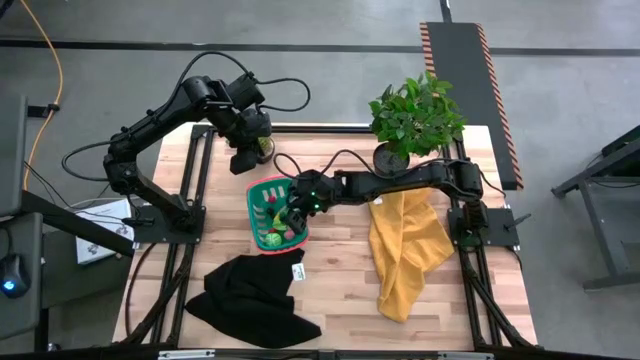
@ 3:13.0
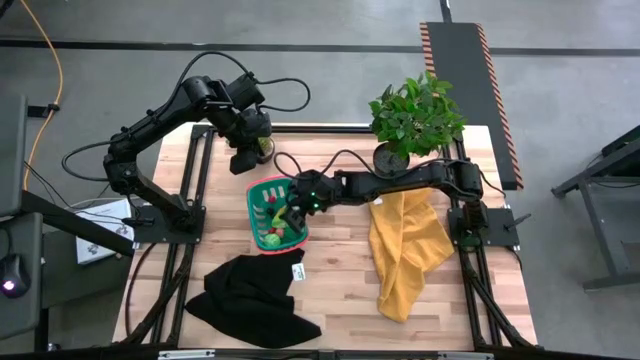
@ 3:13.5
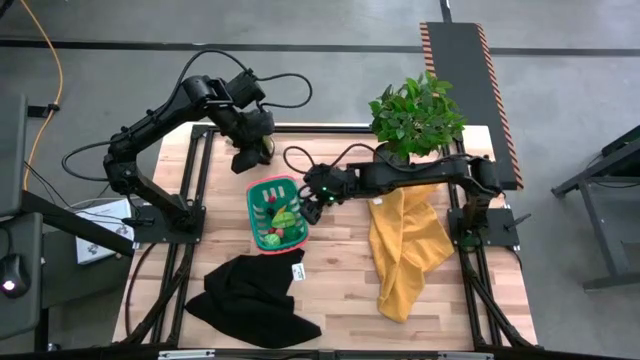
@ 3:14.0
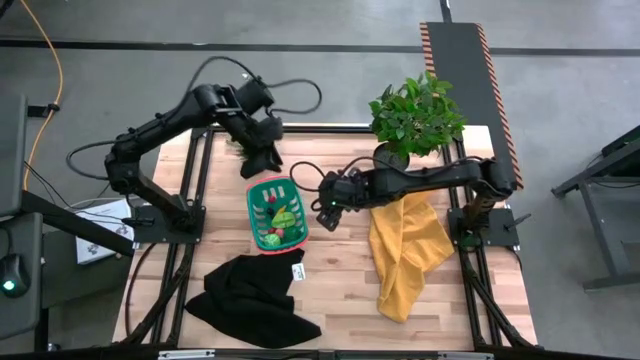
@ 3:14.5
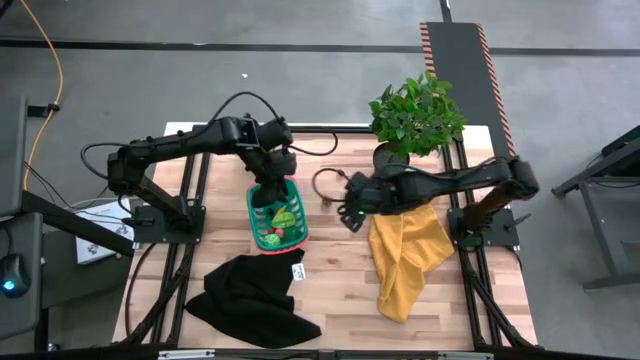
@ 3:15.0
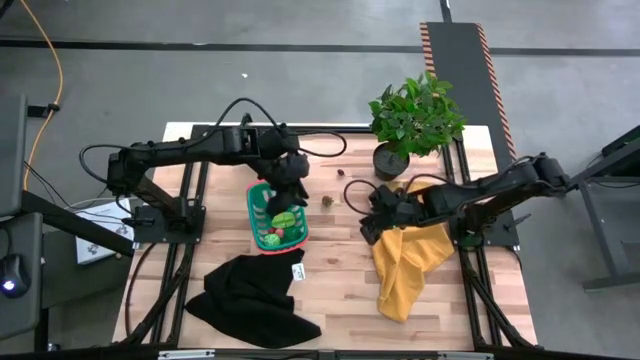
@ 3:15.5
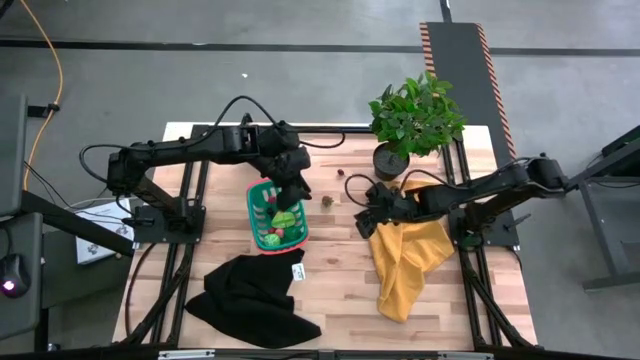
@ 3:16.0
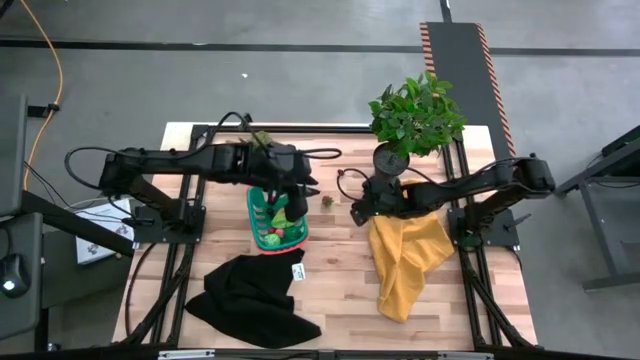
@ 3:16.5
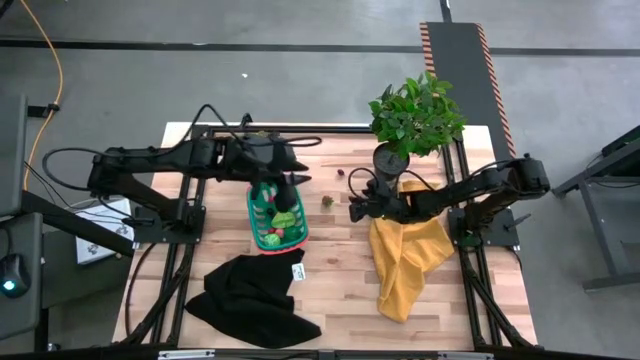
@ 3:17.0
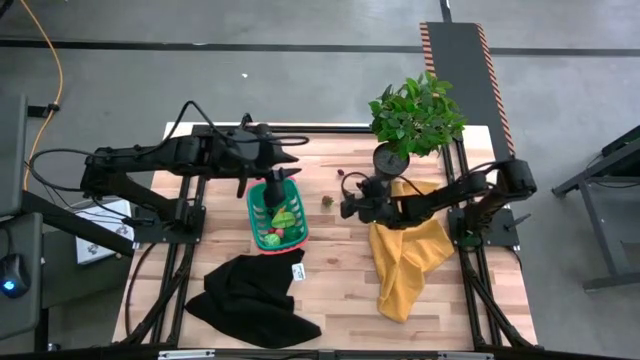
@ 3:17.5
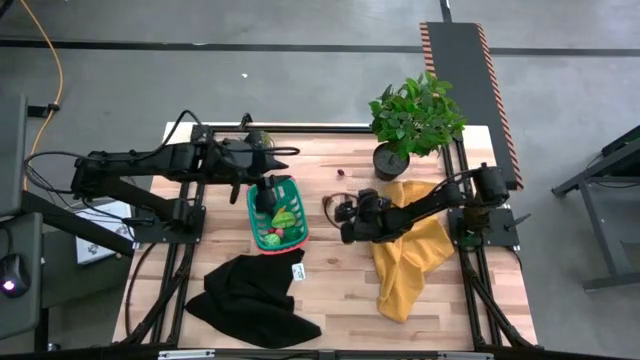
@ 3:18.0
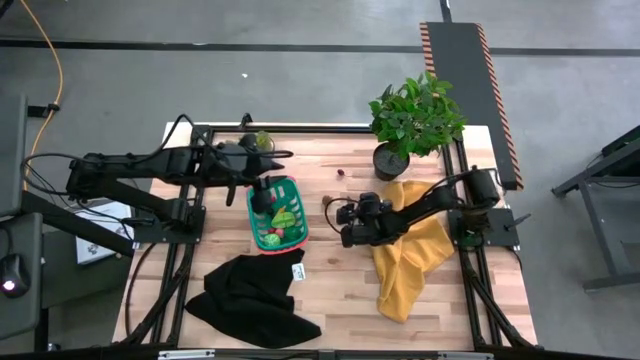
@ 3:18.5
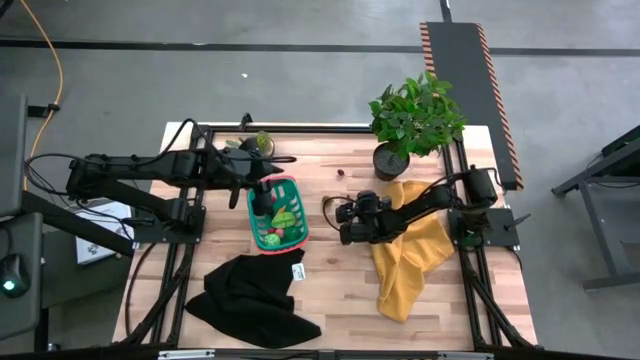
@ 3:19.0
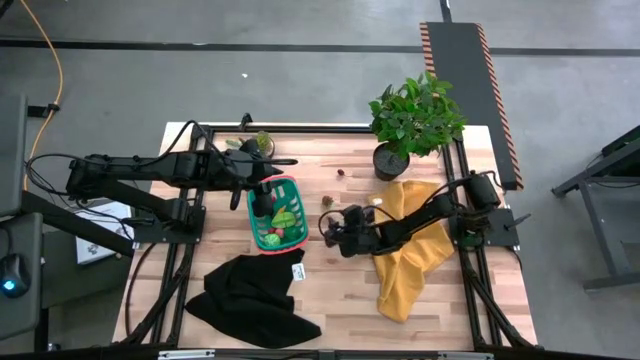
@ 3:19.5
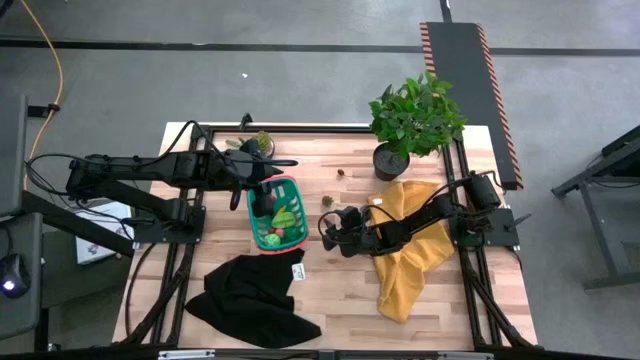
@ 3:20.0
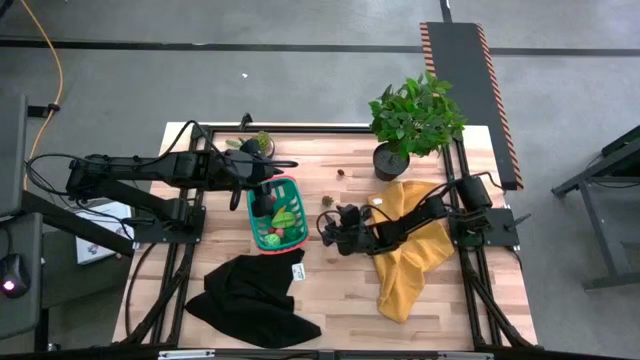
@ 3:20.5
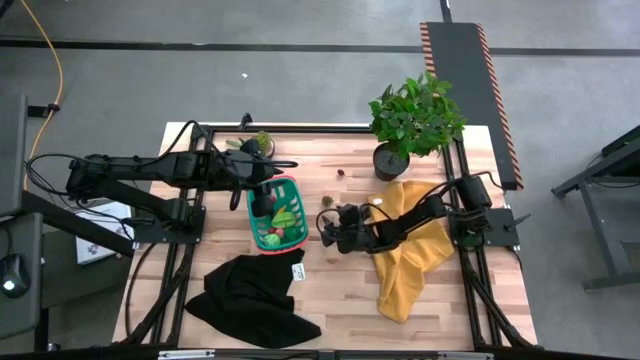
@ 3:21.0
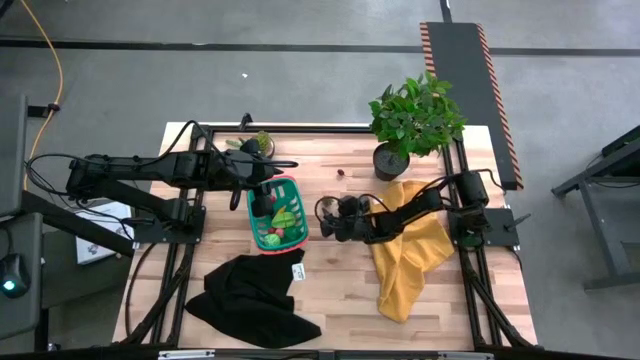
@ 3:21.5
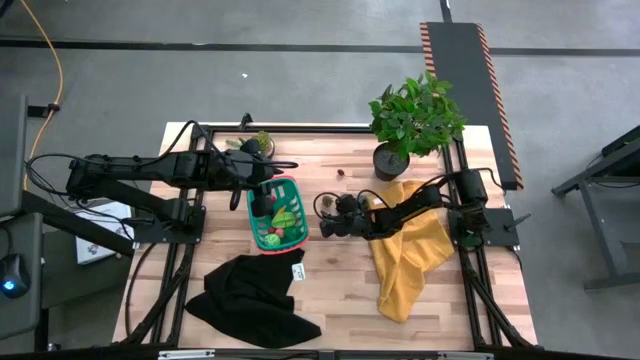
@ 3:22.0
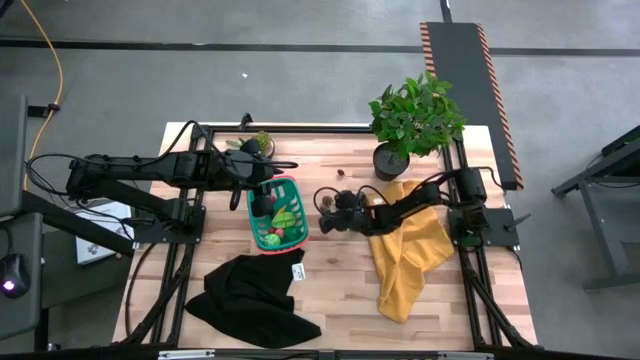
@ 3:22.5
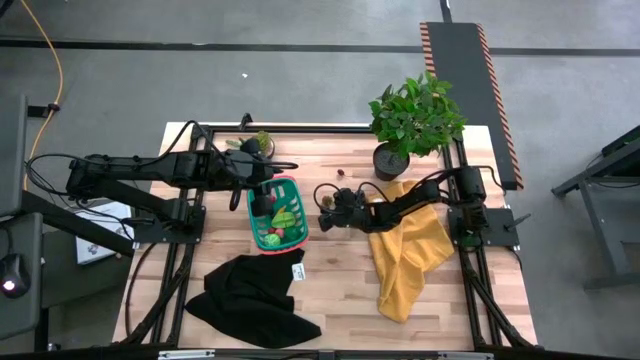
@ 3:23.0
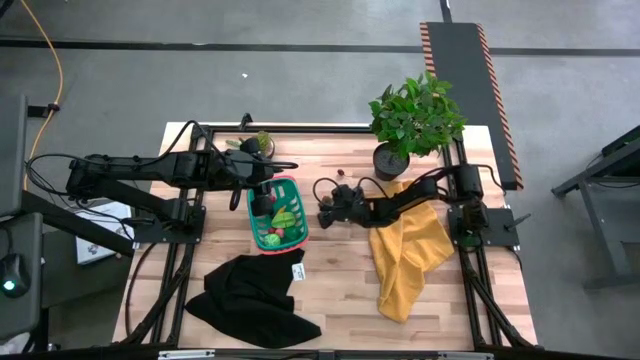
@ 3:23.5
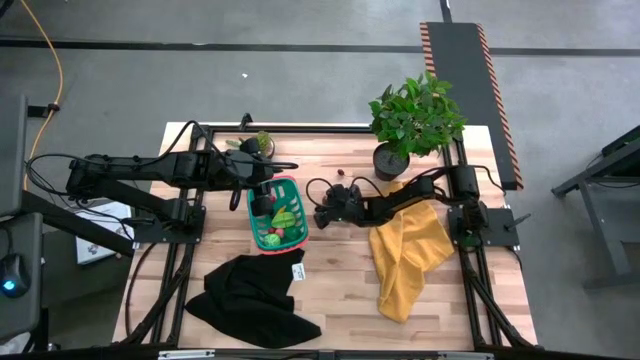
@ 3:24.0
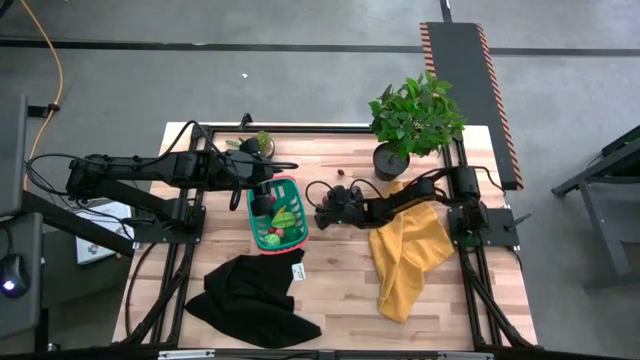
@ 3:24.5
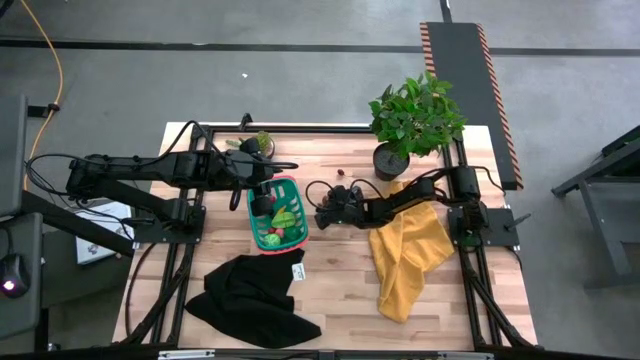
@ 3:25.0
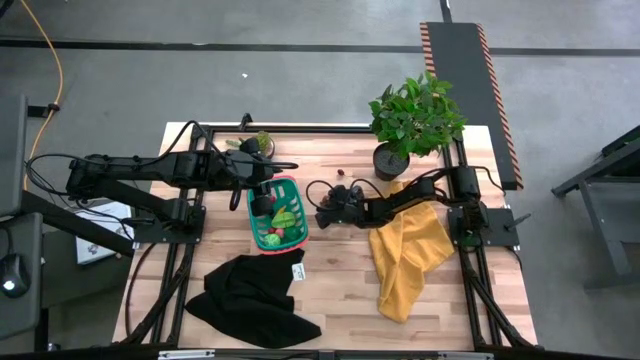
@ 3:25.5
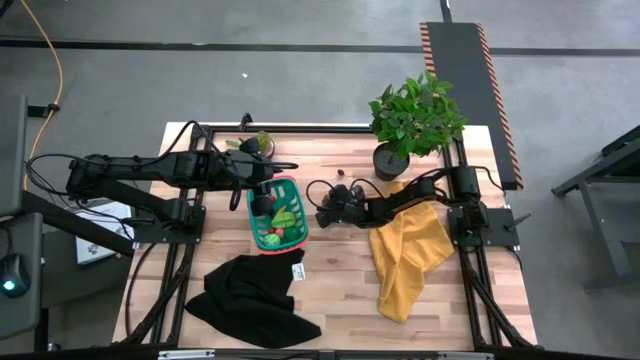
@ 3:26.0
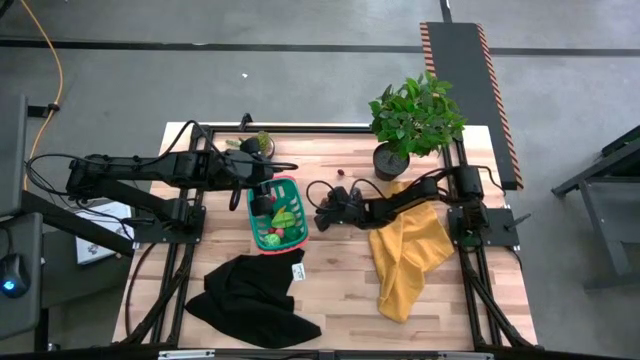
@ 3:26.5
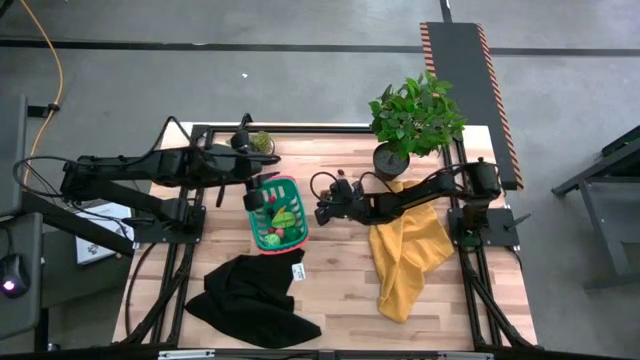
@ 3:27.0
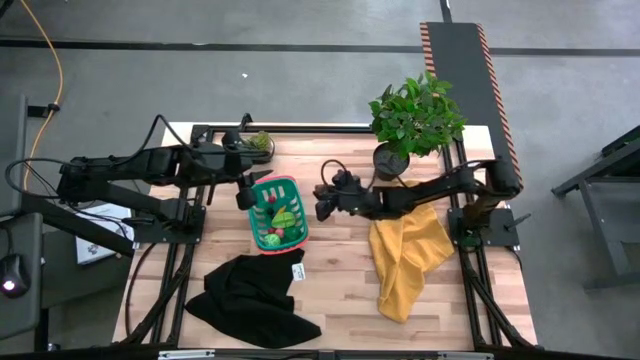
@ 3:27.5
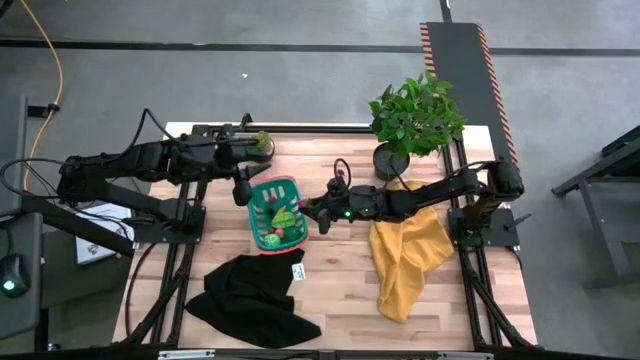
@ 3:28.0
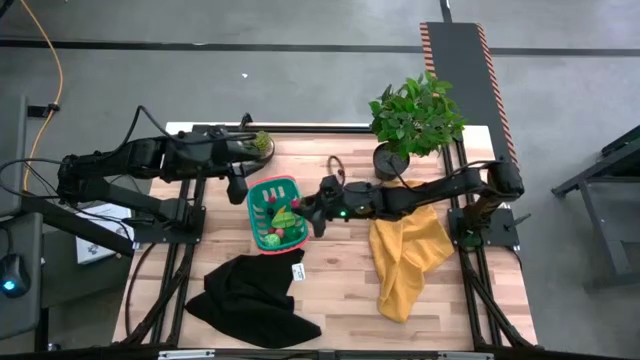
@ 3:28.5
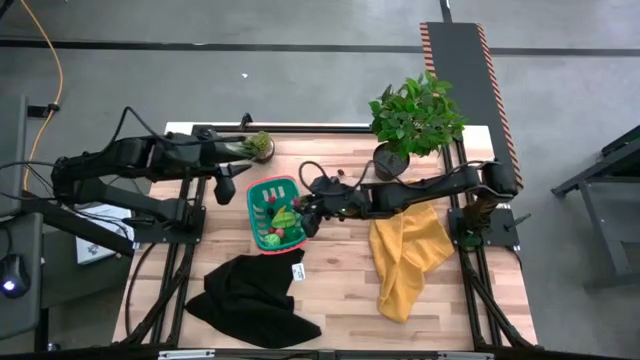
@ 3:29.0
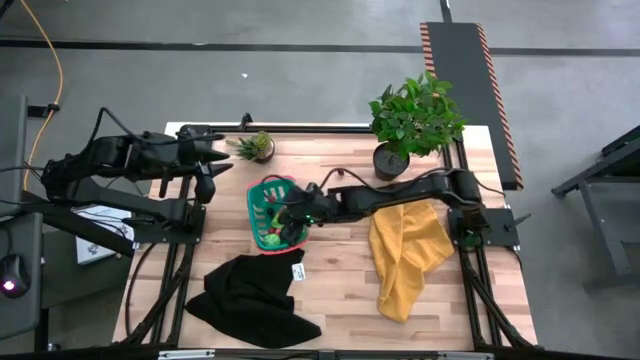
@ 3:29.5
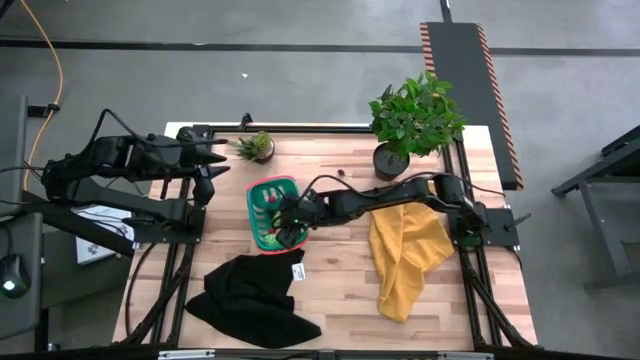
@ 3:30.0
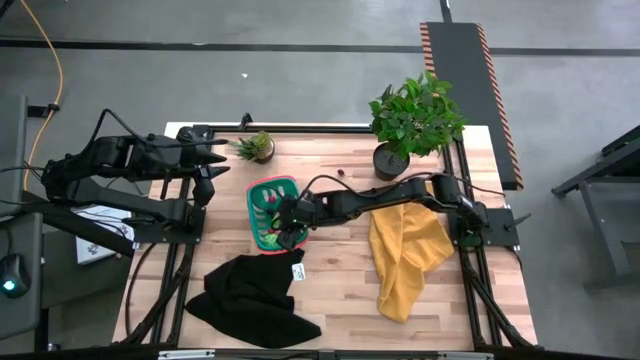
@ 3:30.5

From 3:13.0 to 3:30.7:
Task: Pick and placing Produce into tupperware
Put the red strawberry in the green basket

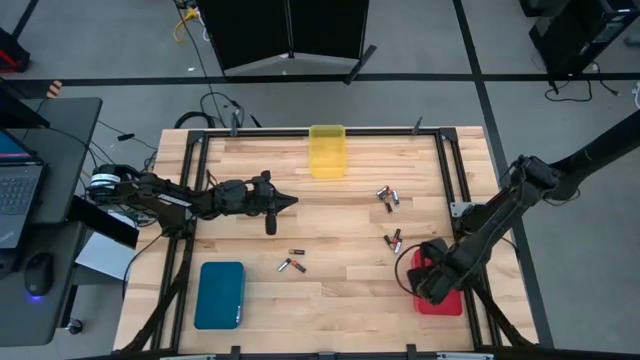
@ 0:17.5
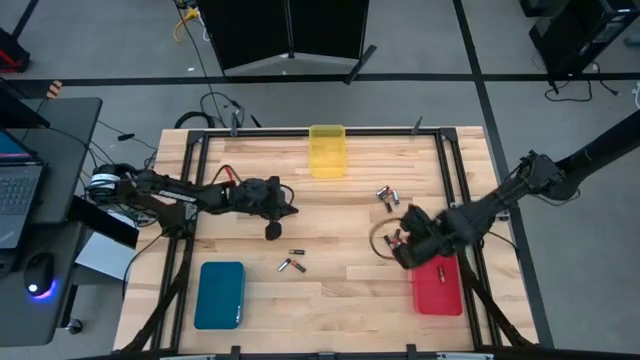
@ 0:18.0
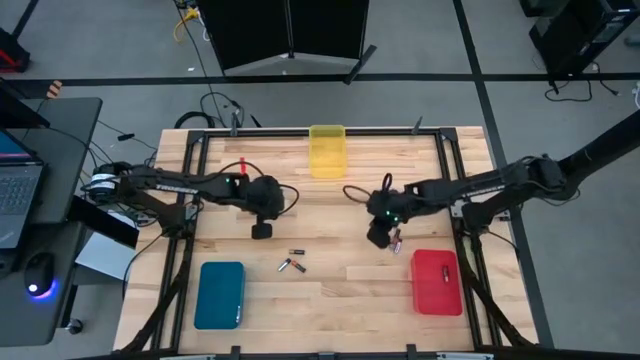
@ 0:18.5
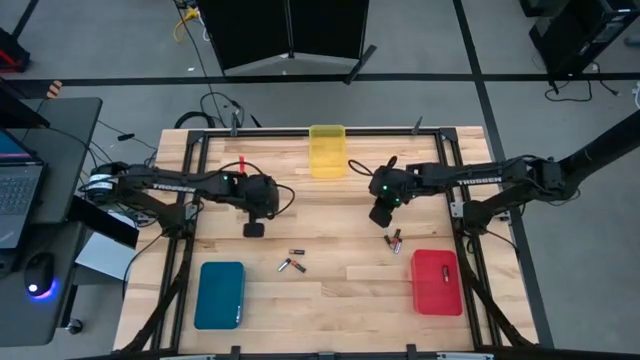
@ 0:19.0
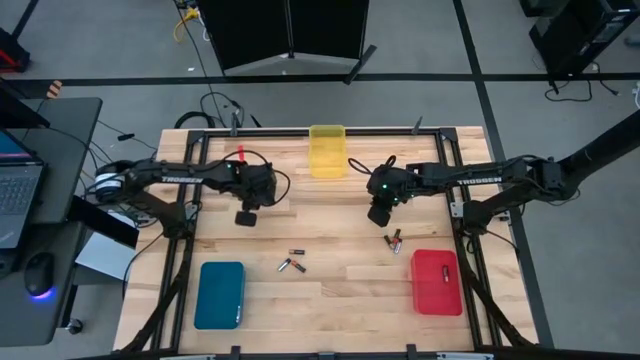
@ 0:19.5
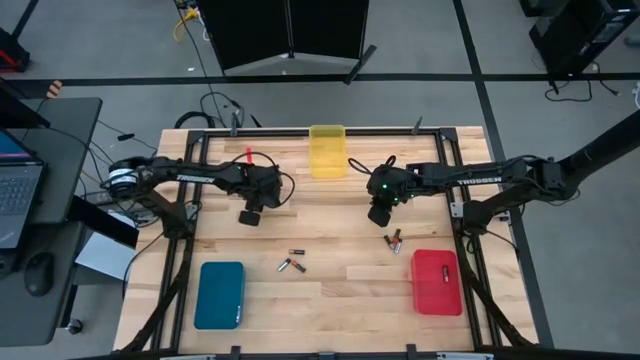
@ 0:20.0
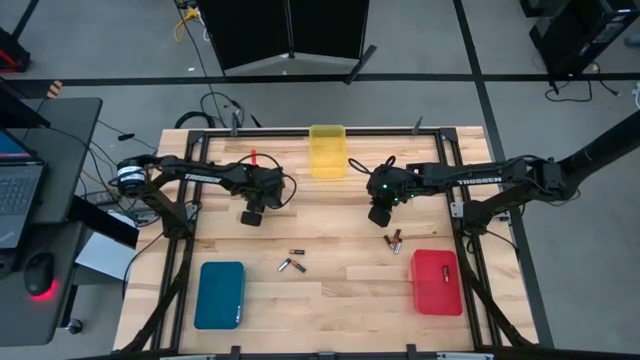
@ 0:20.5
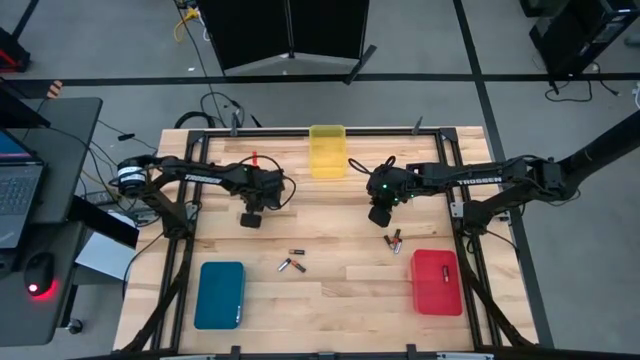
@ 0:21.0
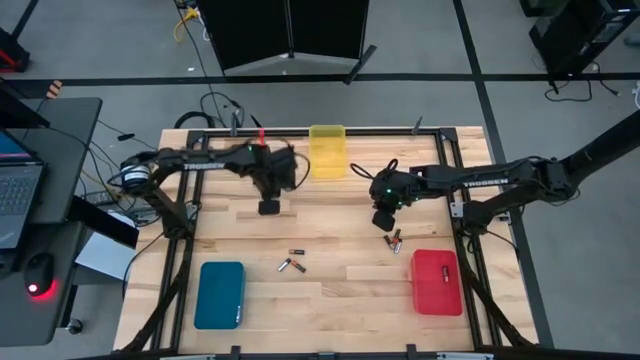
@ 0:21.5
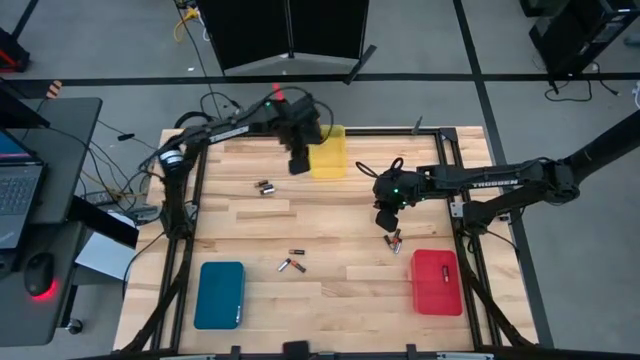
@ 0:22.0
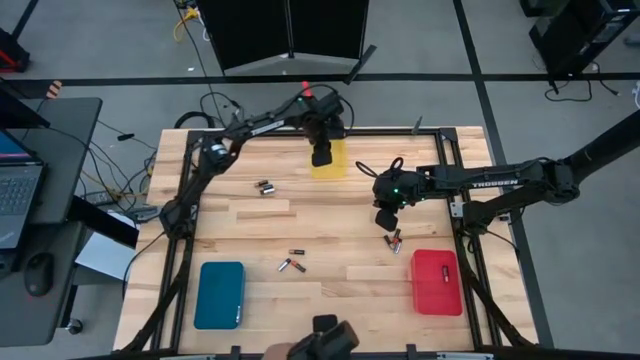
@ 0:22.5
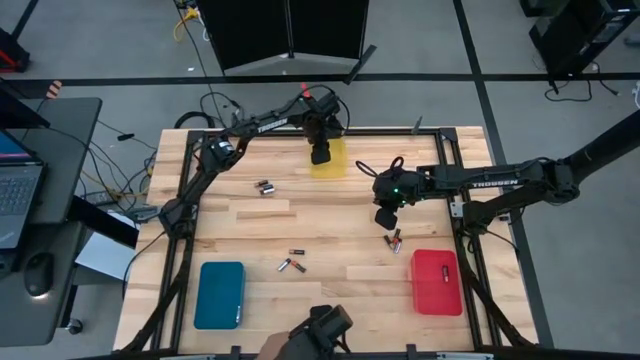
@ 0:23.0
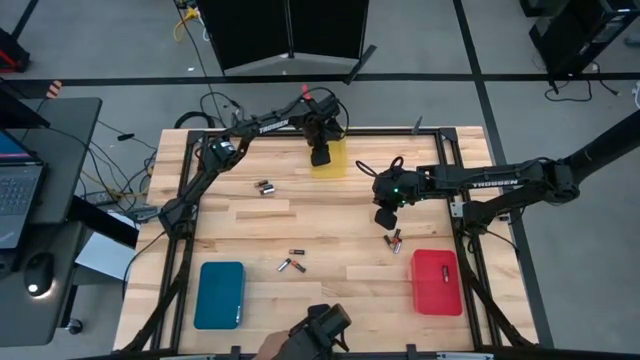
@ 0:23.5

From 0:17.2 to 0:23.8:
Task: Sort batteries
Put the orange battery into the yellow bin
